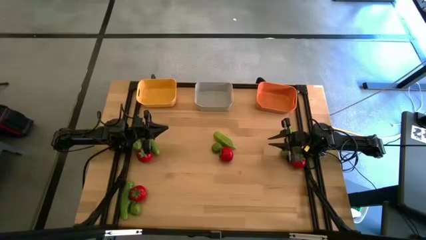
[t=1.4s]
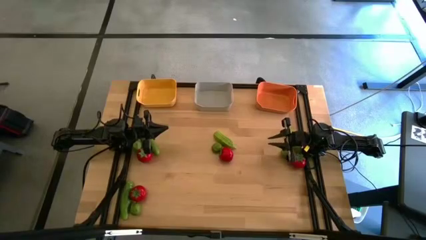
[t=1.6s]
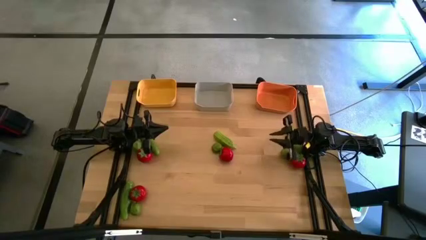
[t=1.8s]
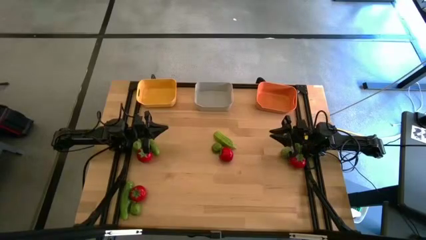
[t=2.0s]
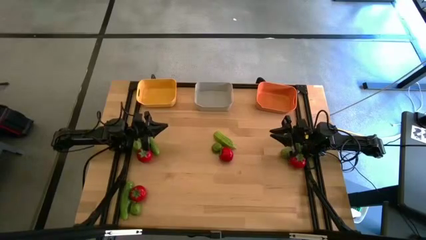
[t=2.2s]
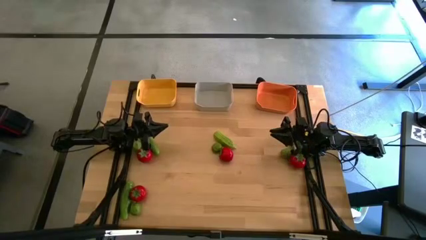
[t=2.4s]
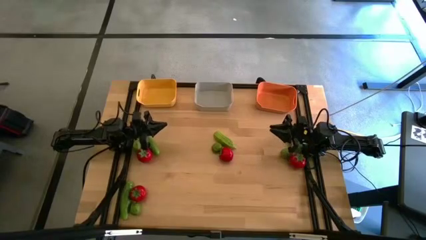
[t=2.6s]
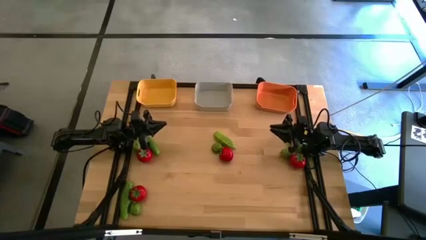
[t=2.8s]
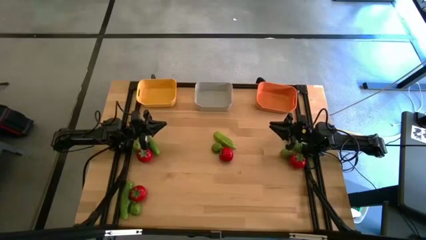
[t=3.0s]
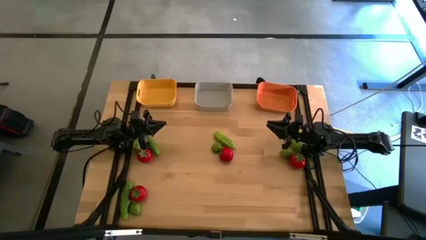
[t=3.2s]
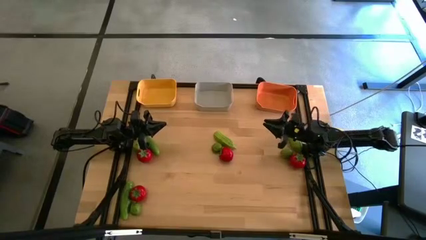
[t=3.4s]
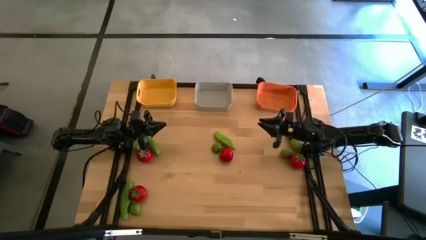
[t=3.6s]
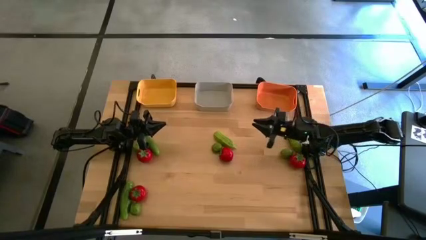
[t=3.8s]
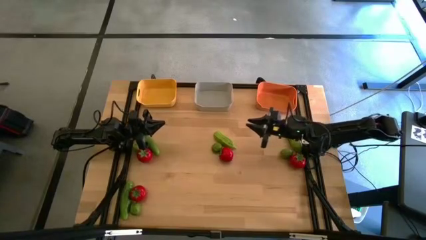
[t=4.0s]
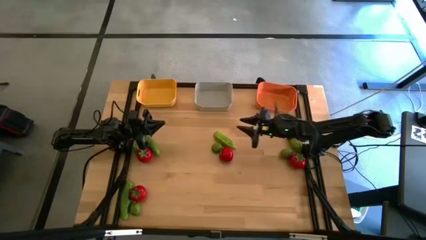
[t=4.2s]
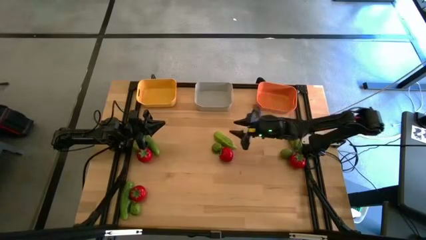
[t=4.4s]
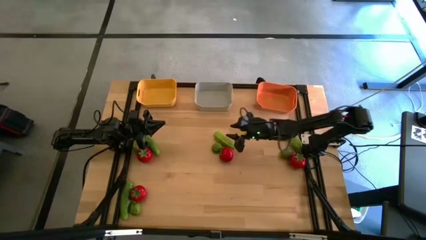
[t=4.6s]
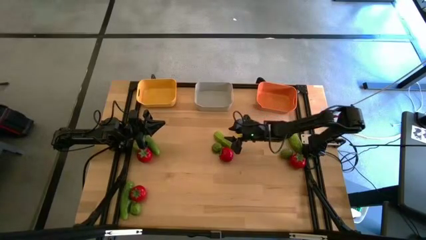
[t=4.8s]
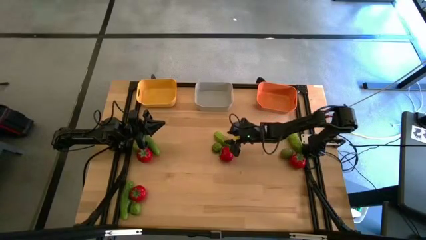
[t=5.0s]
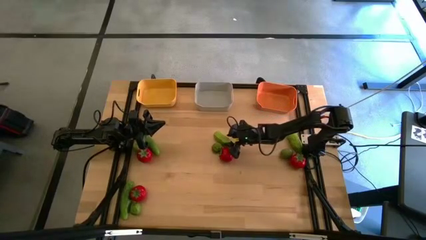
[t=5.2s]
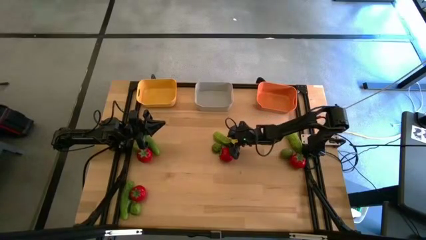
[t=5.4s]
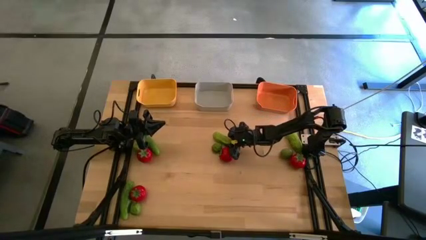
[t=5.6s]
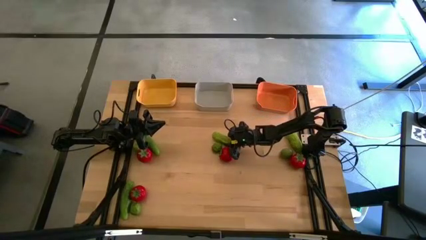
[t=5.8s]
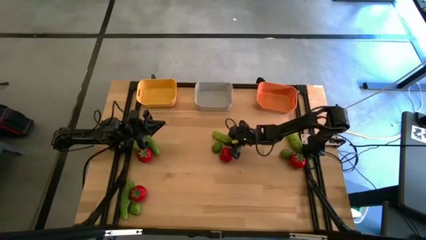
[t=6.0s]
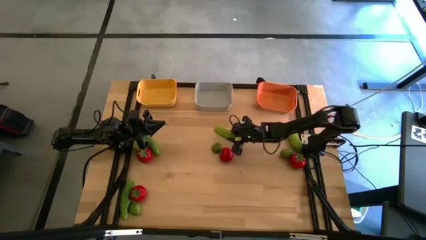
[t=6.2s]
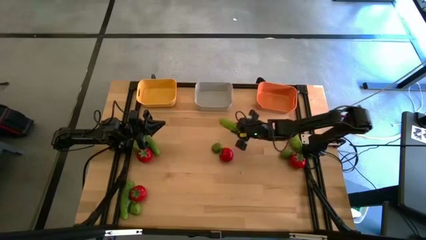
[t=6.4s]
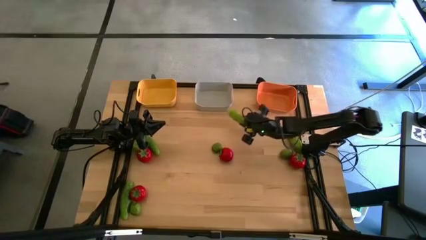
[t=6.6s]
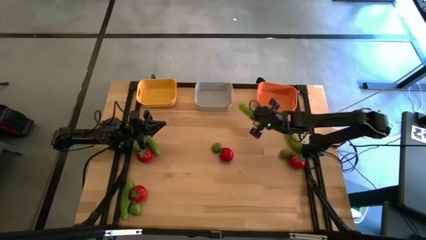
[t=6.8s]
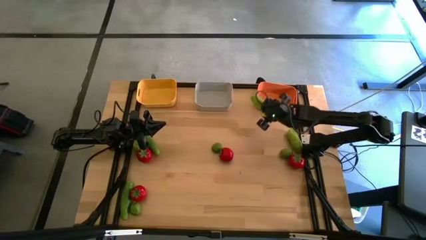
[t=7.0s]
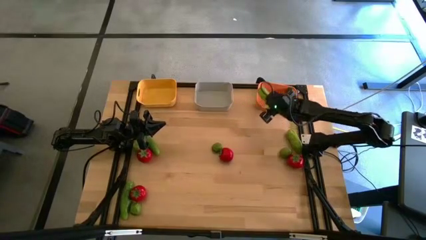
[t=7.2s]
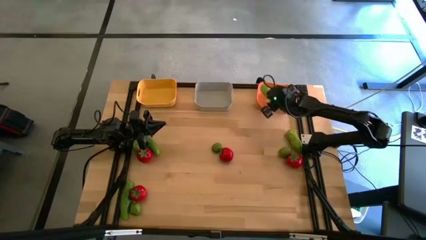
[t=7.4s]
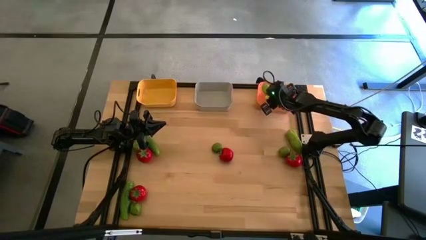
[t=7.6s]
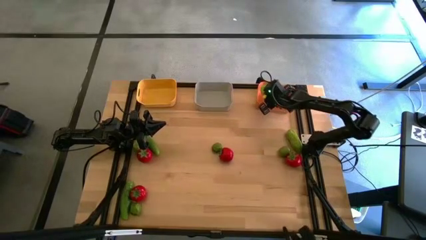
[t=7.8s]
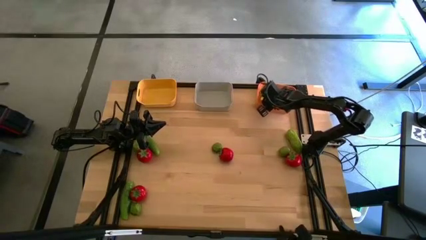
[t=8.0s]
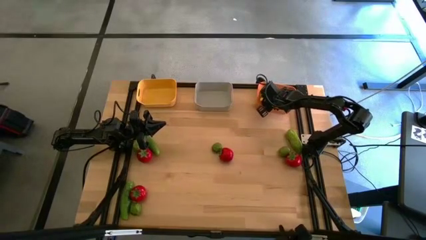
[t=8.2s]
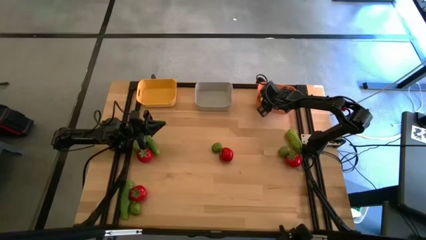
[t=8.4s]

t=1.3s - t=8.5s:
Task: Sort produce into baskets
Put the cucumber into the orange bin

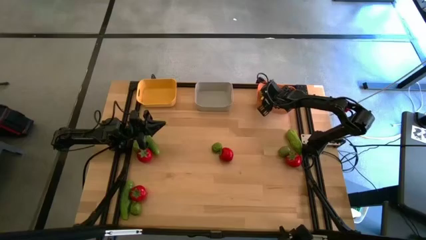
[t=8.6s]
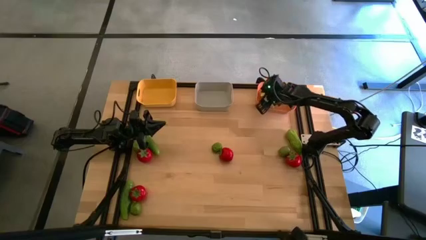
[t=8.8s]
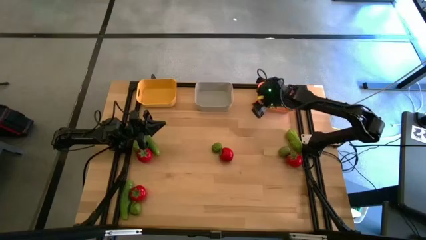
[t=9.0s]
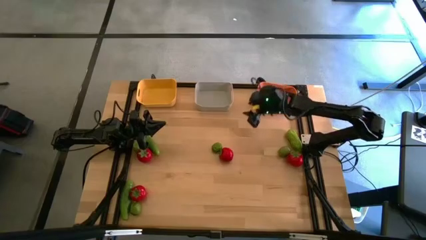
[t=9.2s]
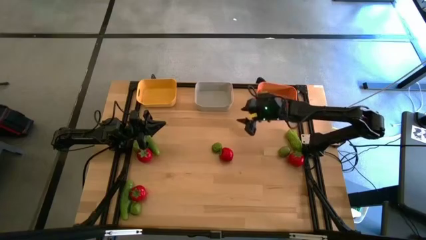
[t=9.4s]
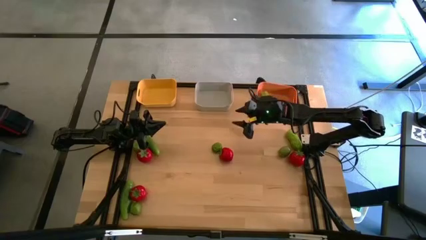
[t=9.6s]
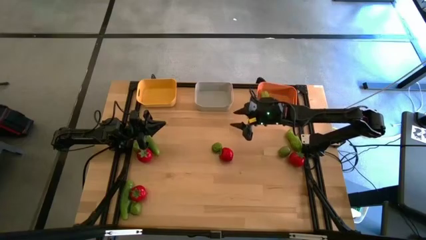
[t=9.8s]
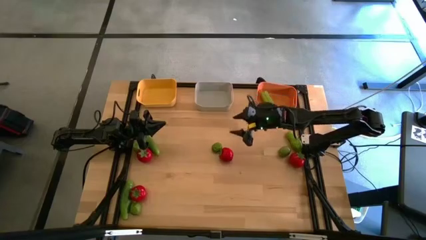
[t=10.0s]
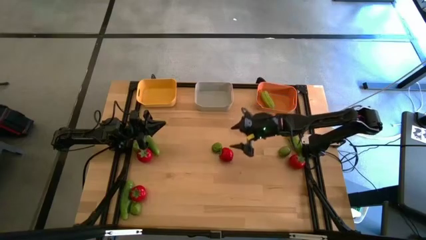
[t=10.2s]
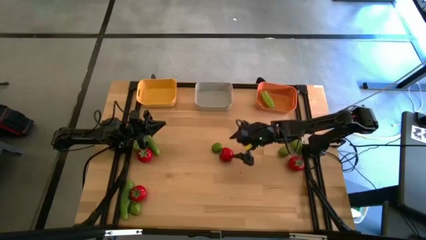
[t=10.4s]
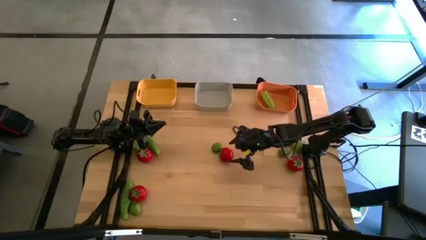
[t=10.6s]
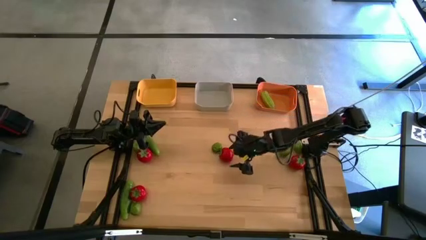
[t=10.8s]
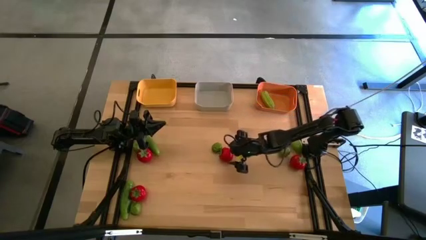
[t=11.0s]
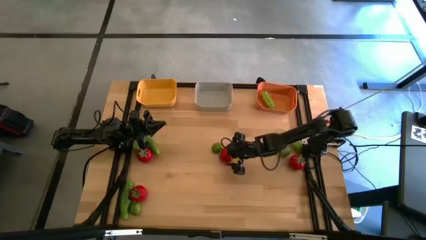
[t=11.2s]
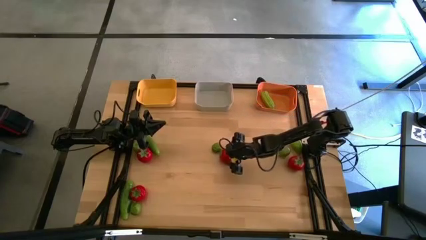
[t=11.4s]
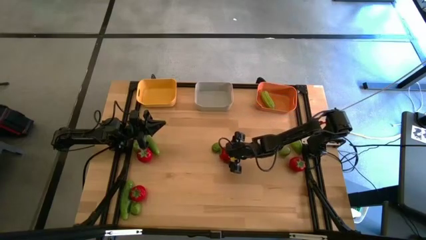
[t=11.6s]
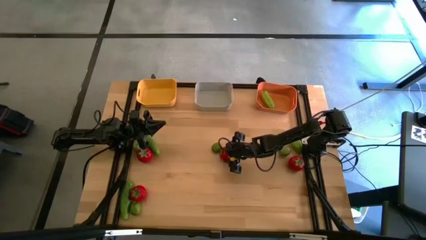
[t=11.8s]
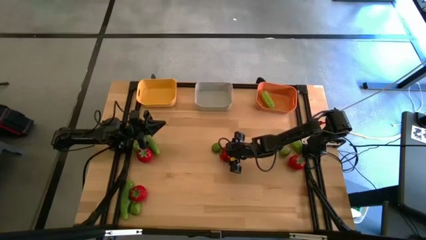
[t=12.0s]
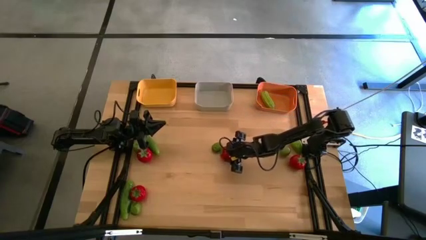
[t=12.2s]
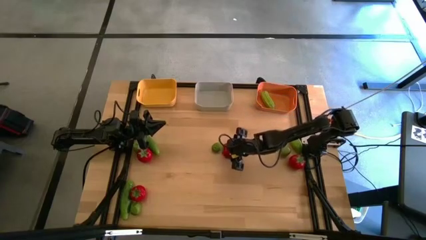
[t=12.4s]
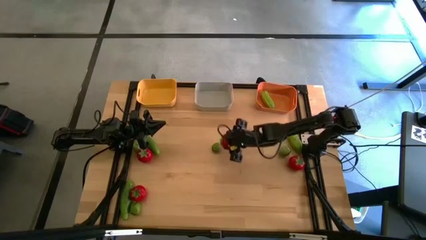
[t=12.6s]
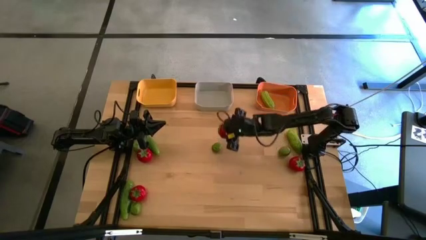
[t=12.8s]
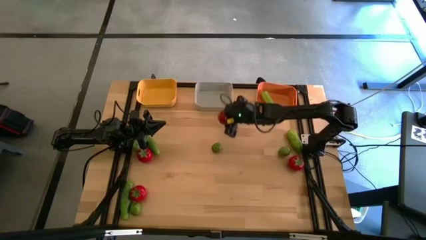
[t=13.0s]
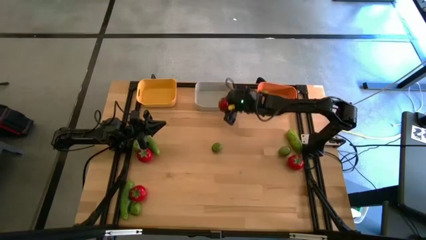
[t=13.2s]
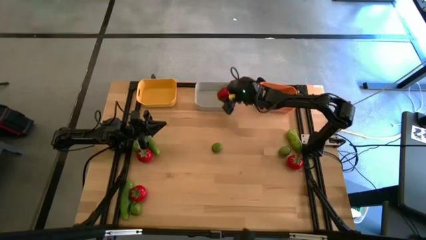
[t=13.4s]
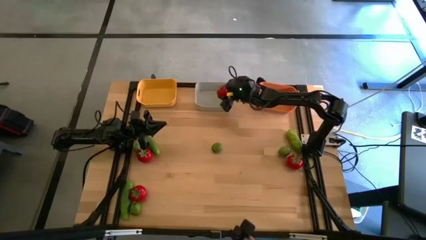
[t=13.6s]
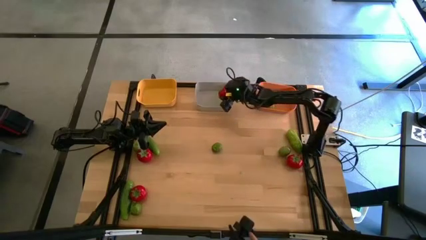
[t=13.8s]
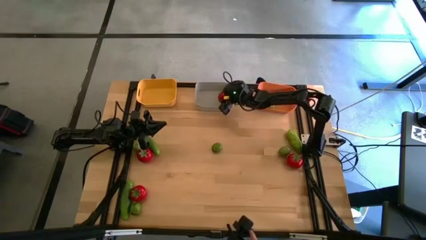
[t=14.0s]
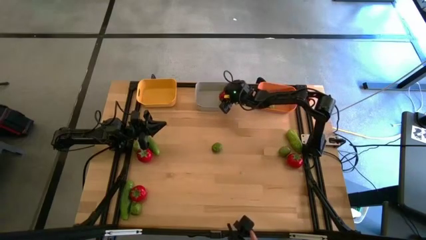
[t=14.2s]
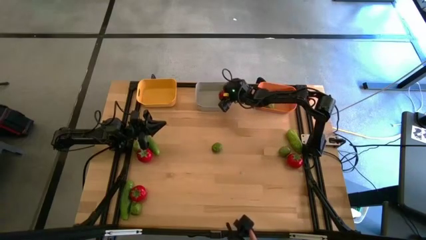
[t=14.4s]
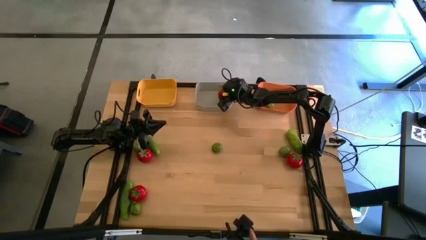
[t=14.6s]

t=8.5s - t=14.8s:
Put the tomatoes into the gray bin

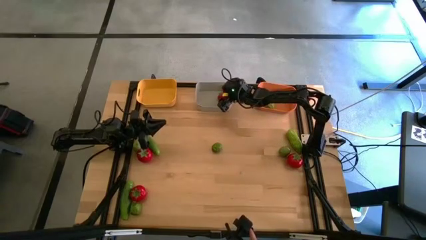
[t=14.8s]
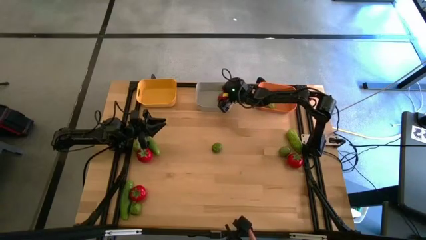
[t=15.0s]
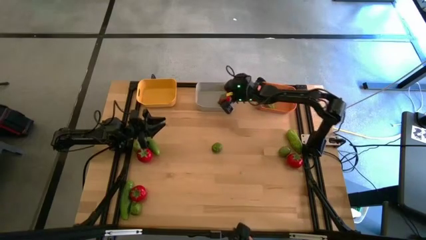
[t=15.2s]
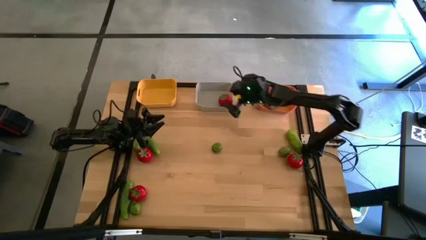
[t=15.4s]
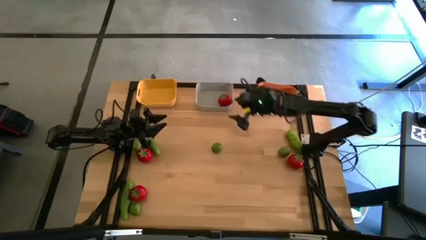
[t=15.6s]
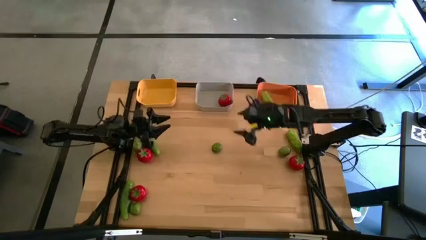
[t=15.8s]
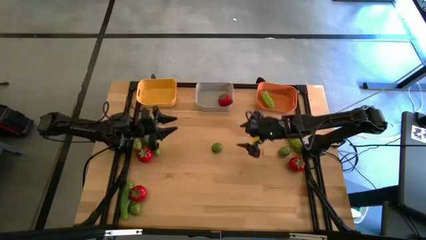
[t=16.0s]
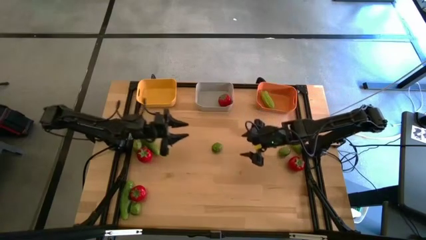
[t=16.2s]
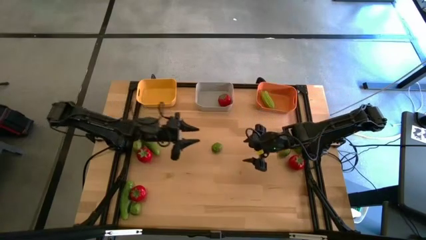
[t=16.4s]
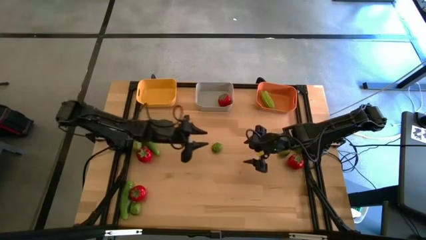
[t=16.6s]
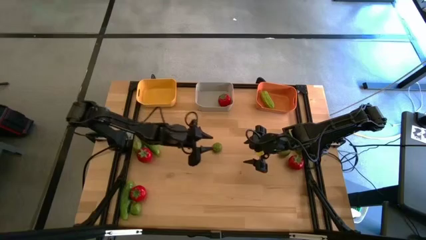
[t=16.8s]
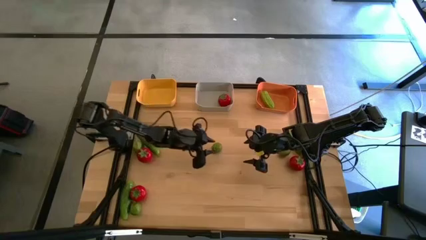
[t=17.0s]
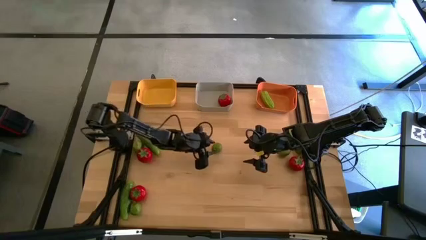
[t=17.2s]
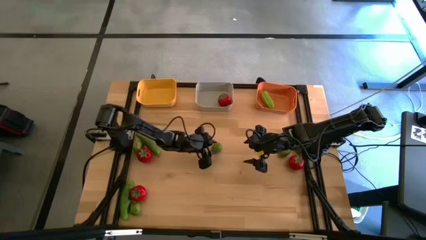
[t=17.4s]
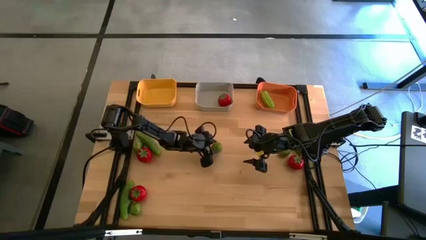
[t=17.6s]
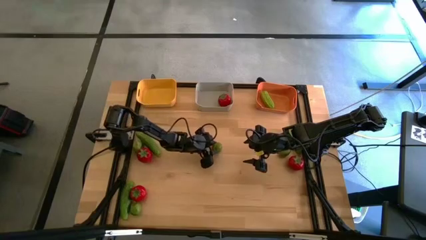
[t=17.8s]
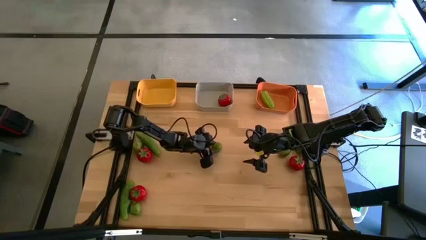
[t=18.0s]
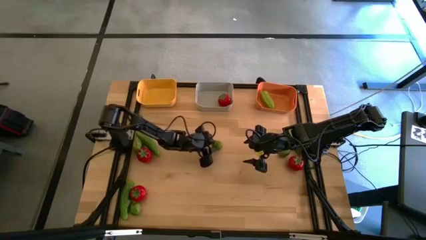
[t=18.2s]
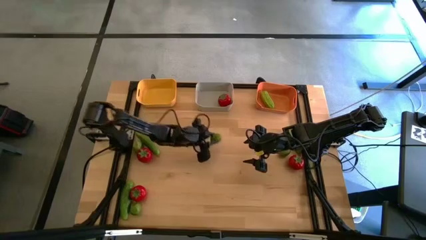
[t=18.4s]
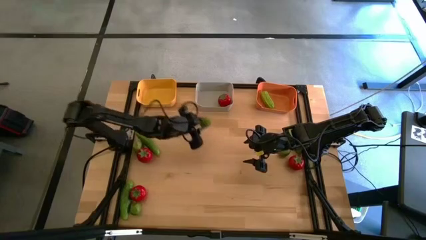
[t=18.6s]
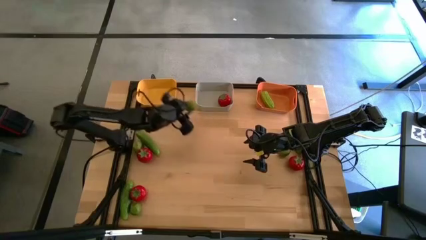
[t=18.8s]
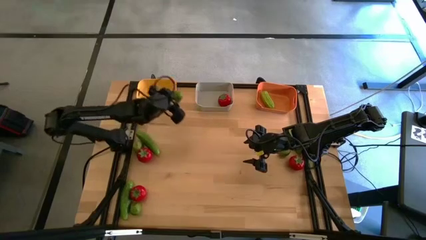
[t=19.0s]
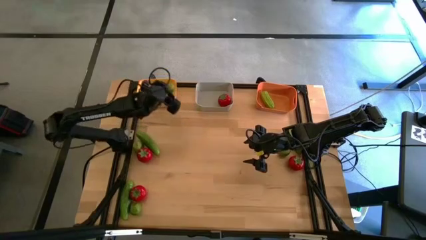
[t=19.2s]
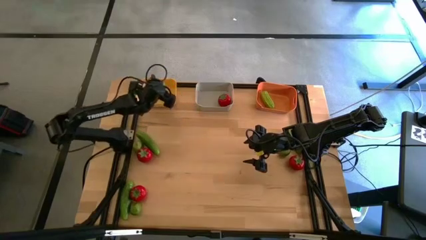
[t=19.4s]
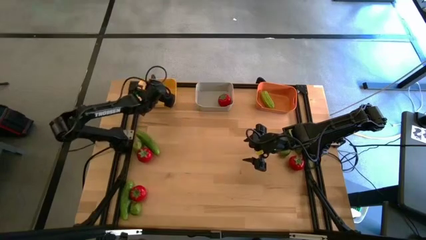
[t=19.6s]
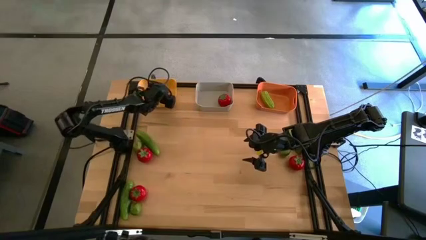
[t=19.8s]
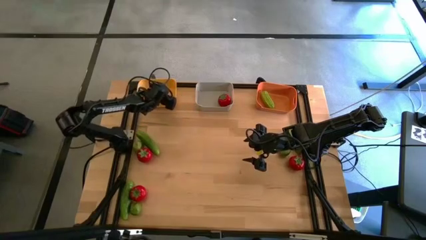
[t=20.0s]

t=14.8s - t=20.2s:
Put the lime into the yellow bin
